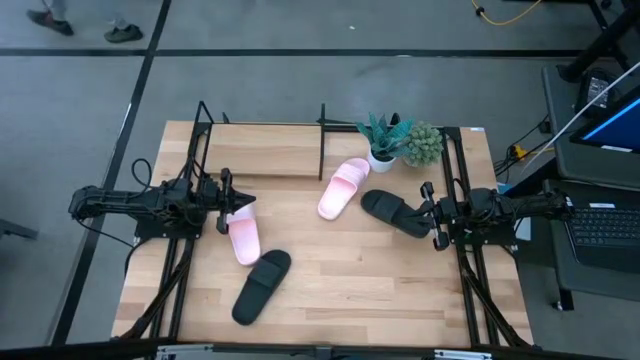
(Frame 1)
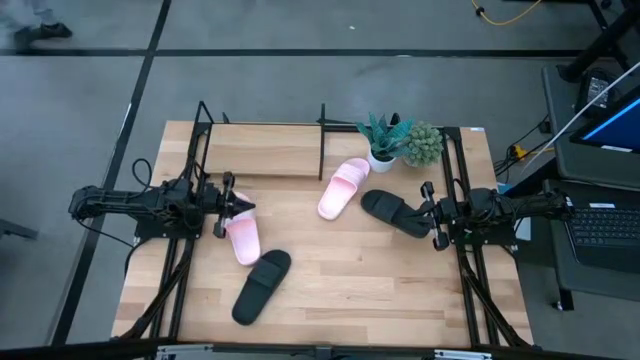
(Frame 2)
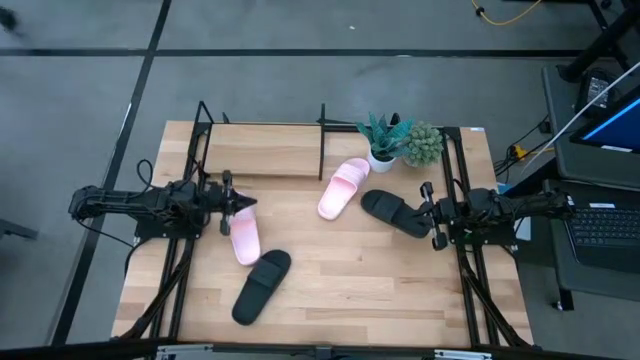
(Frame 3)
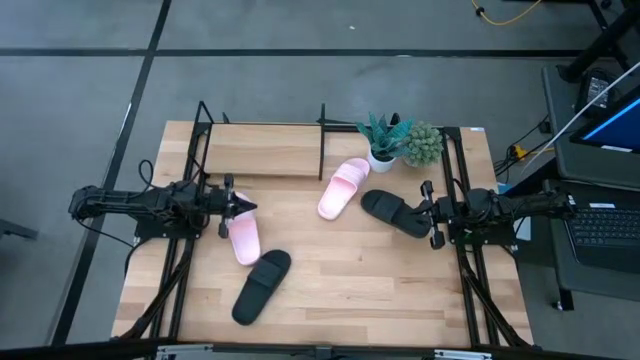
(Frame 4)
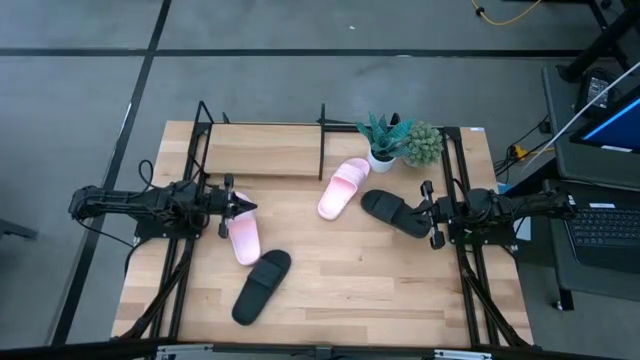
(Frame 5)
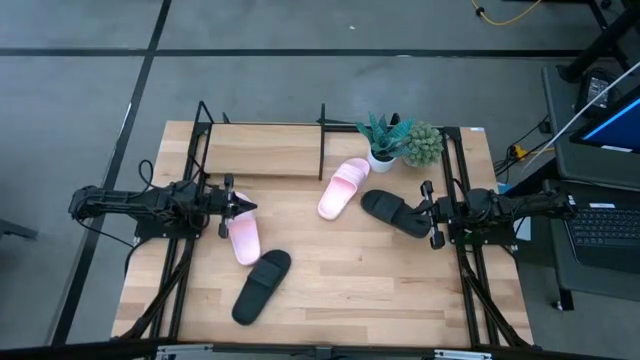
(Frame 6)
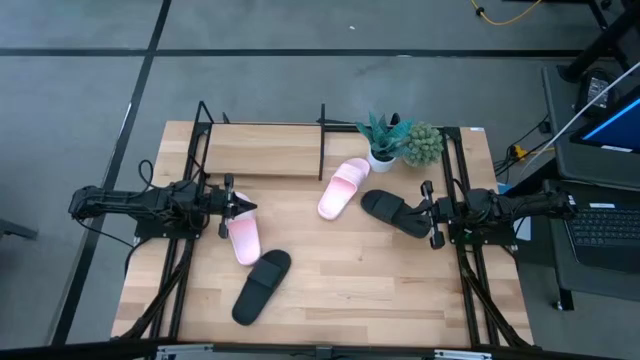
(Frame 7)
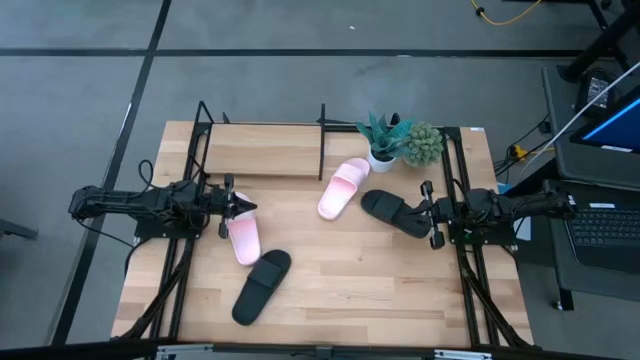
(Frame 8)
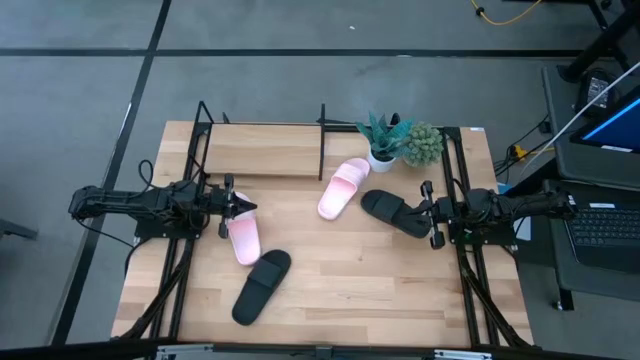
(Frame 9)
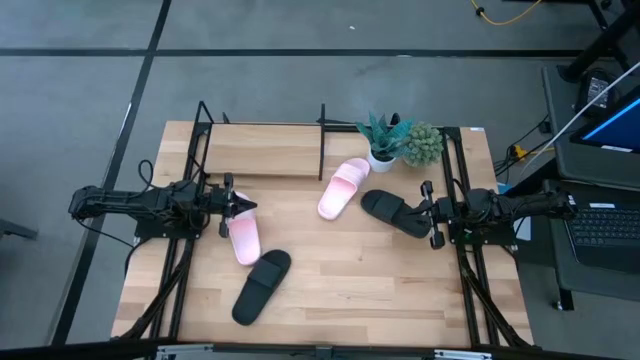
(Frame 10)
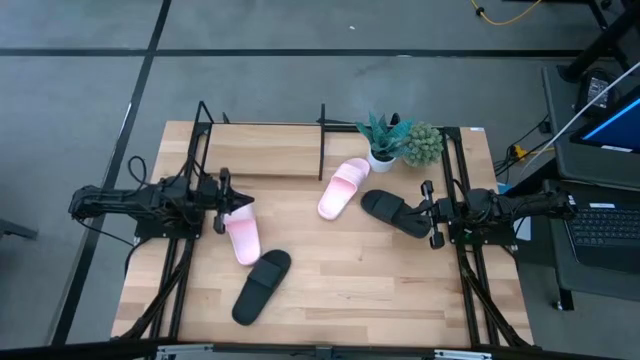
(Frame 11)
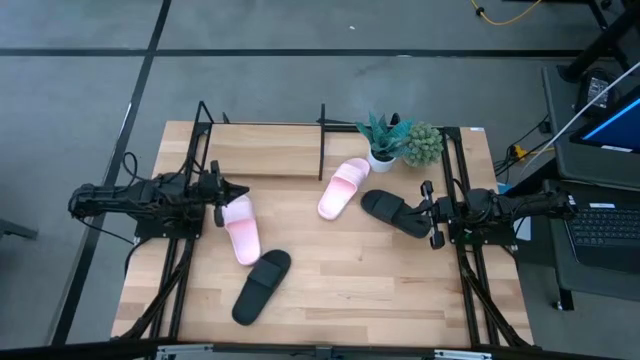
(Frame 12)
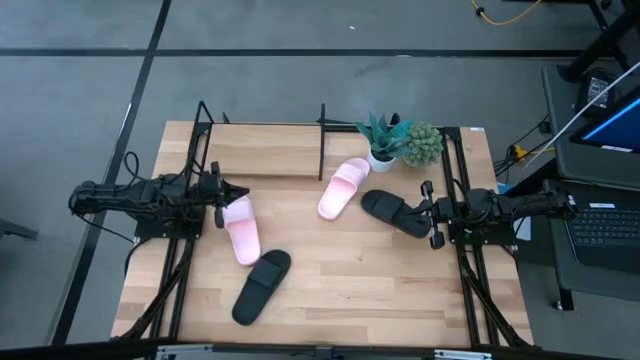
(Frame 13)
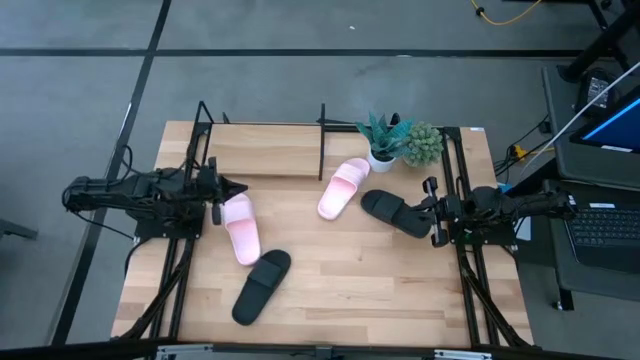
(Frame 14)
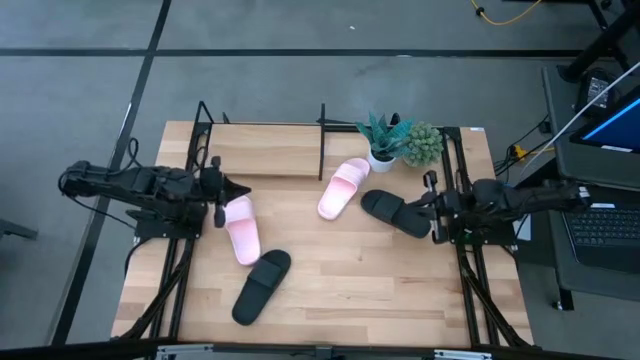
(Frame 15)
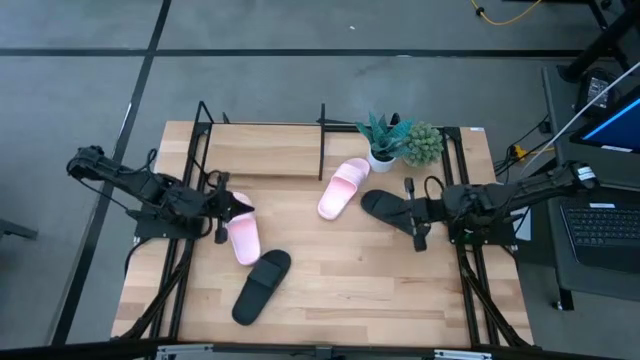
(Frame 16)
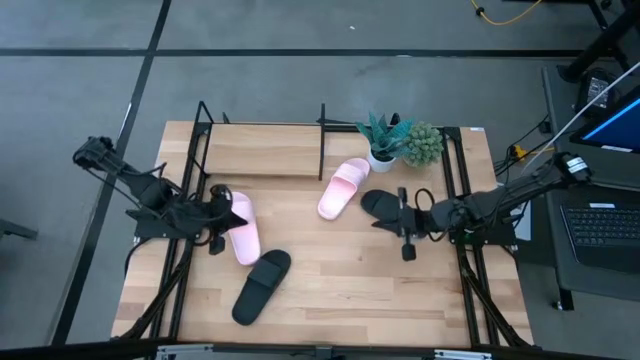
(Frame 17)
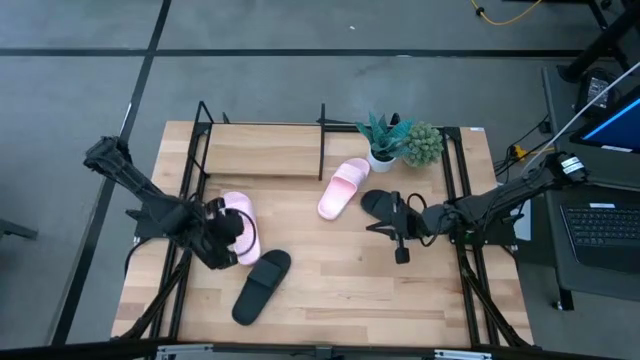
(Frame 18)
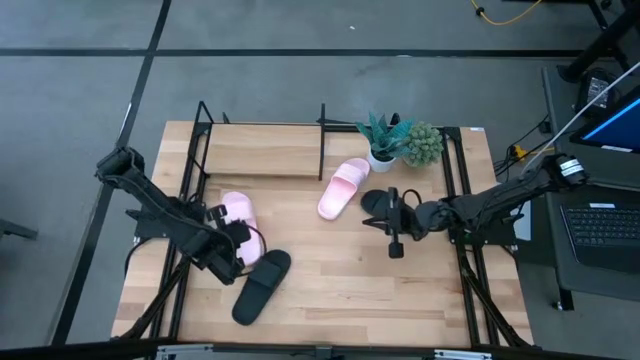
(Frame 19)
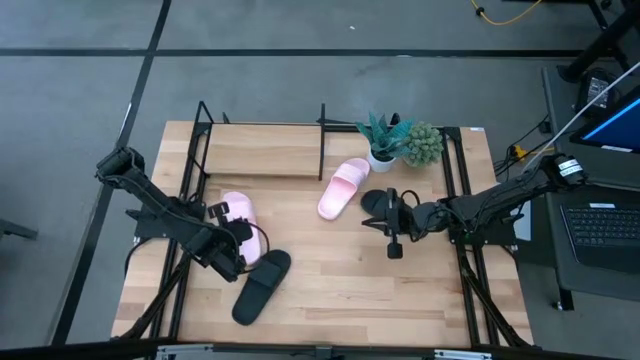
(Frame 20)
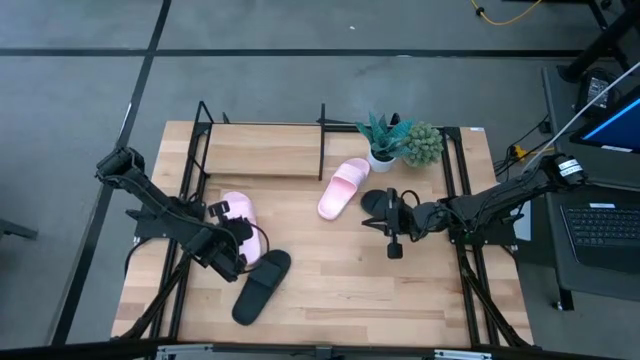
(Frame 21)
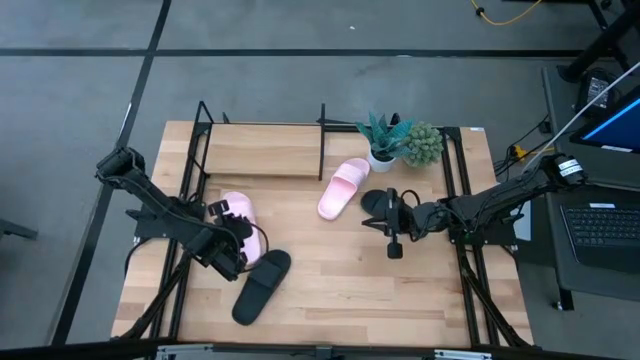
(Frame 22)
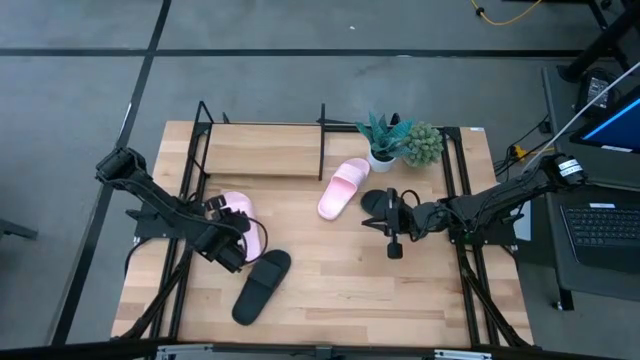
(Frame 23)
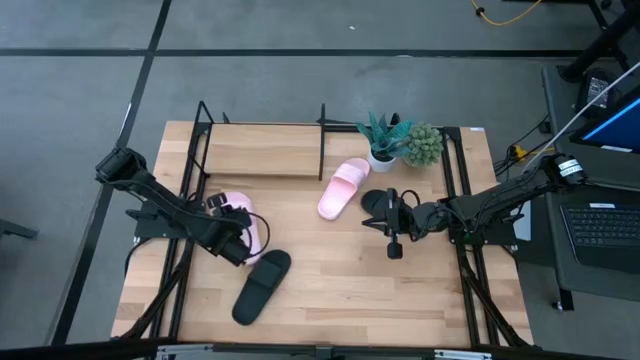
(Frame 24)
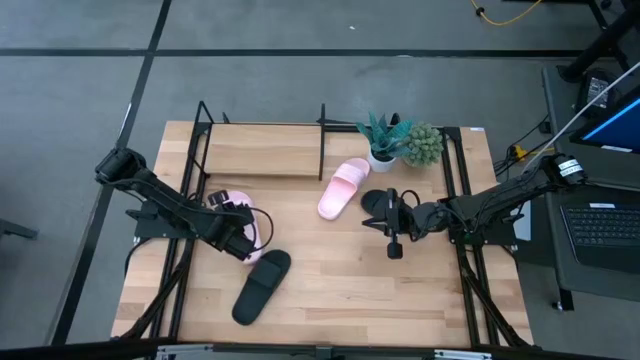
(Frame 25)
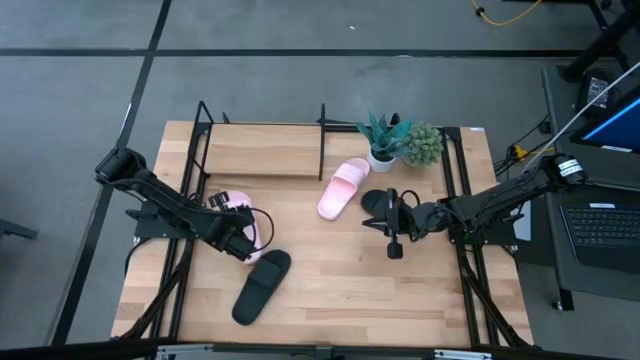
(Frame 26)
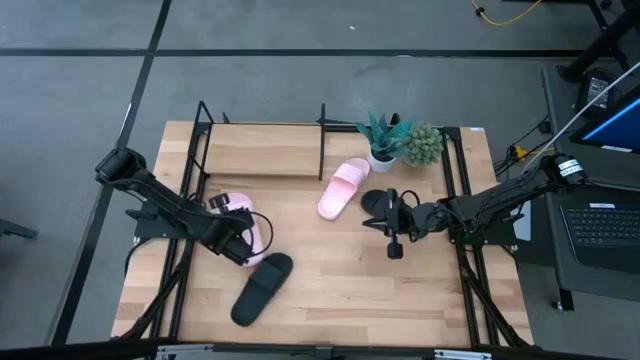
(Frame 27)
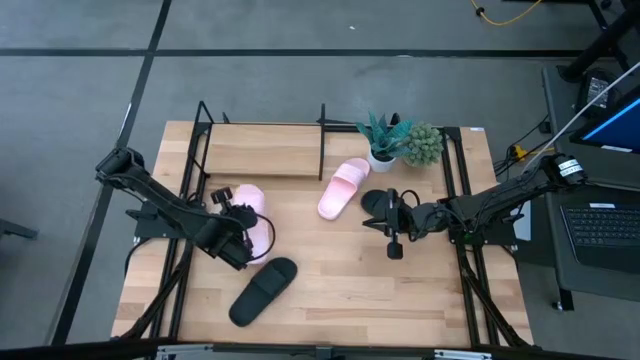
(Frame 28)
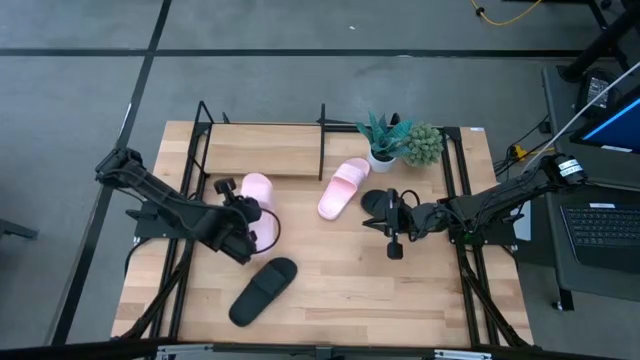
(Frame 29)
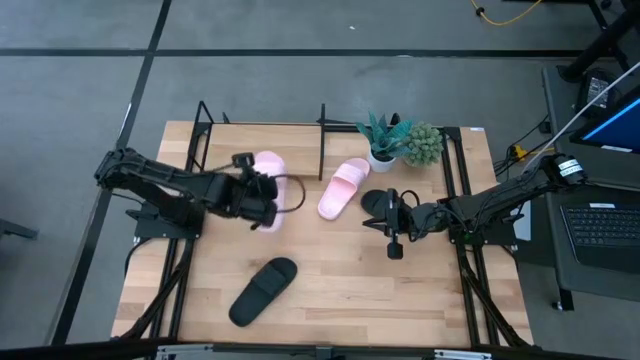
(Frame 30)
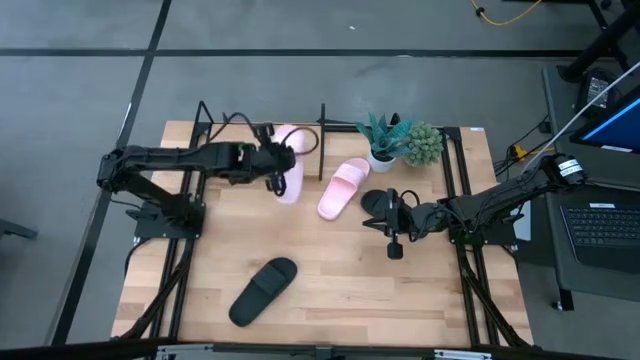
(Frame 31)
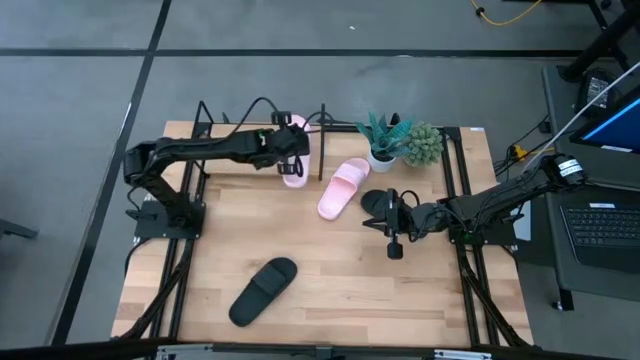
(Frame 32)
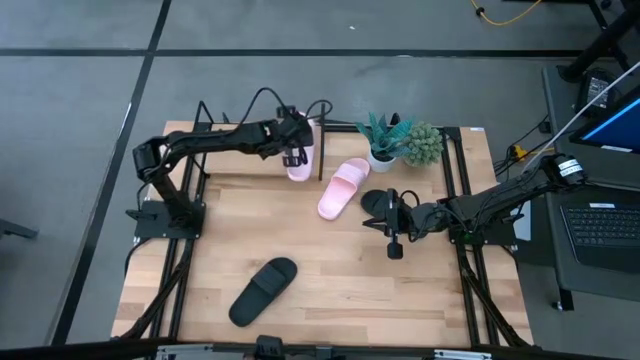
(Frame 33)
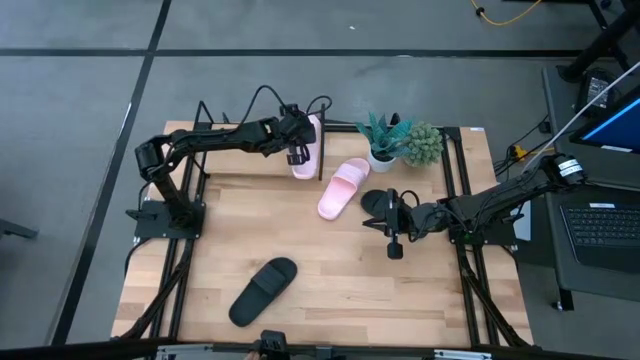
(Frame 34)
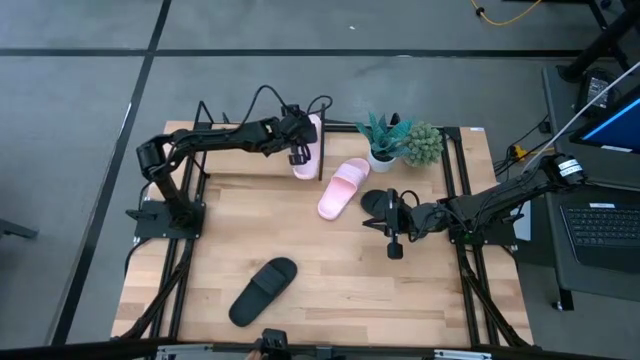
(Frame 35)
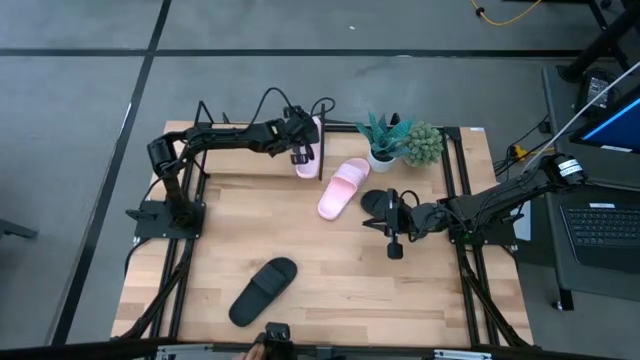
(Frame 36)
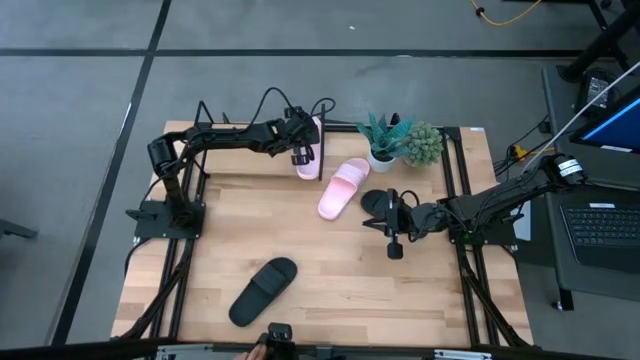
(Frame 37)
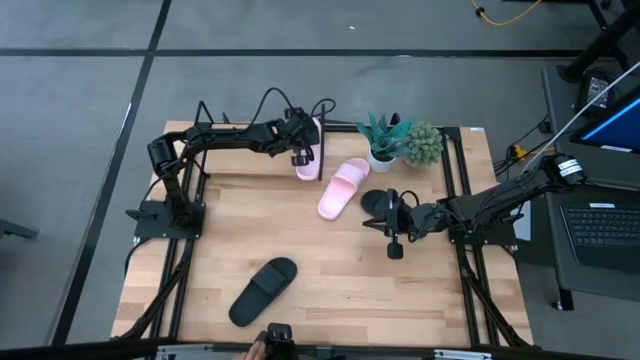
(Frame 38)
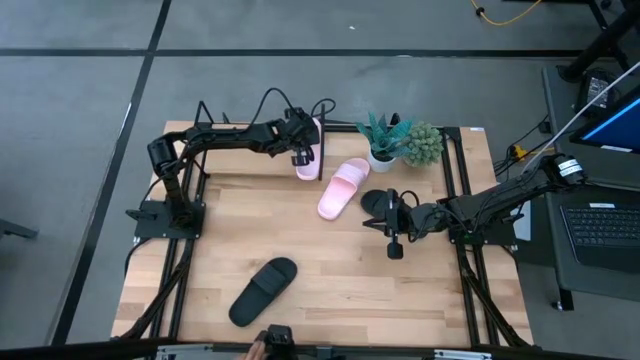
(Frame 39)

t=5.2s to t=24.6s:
Task: Pick and place slides into the shelf
Put the left pink slide on the shelf
